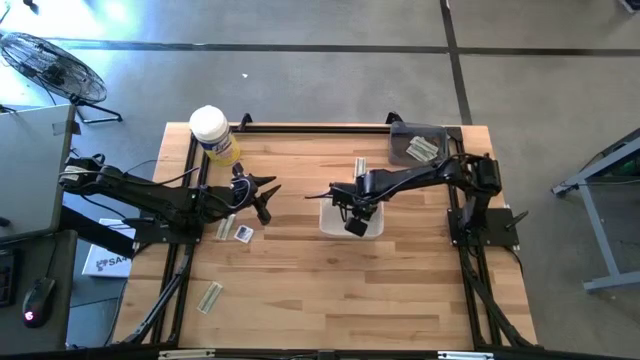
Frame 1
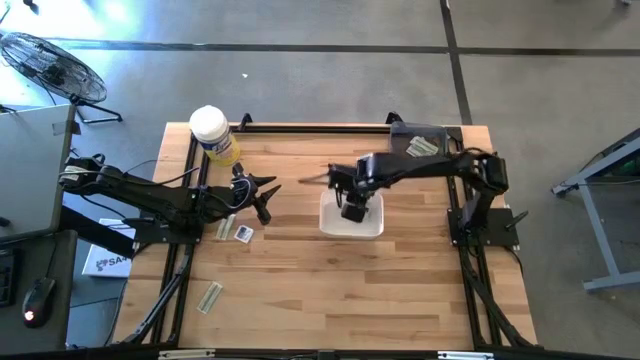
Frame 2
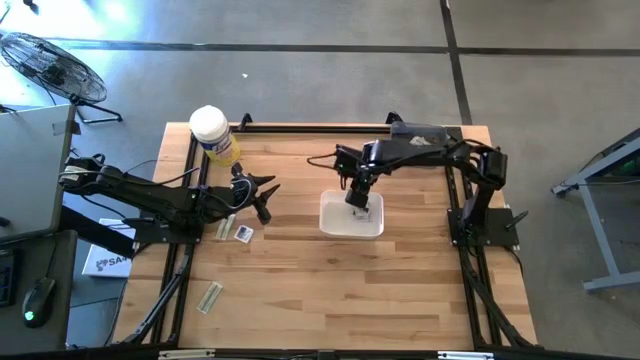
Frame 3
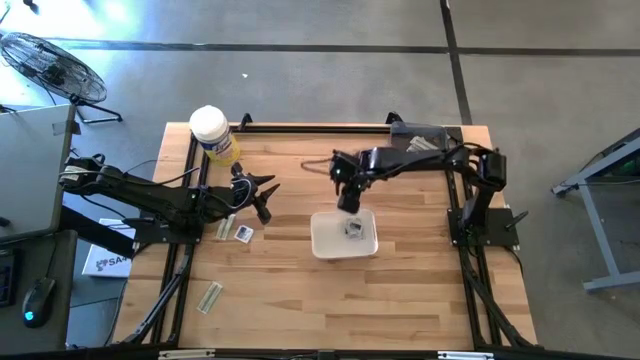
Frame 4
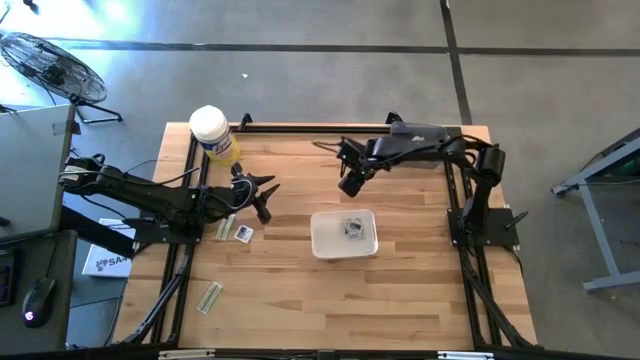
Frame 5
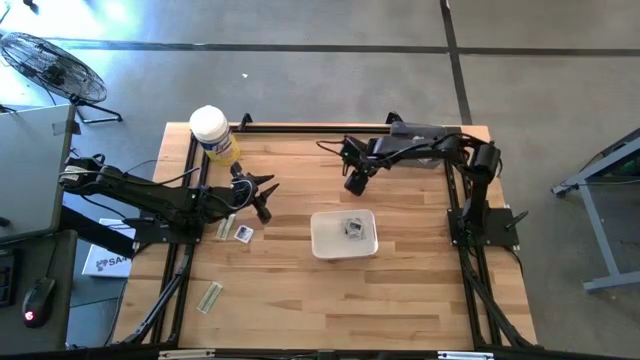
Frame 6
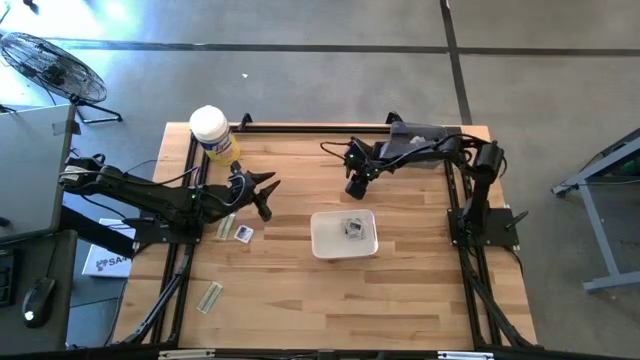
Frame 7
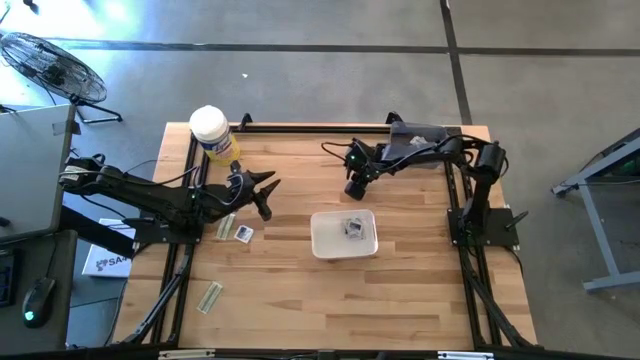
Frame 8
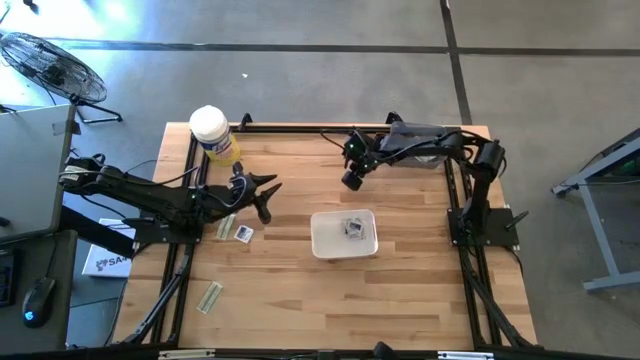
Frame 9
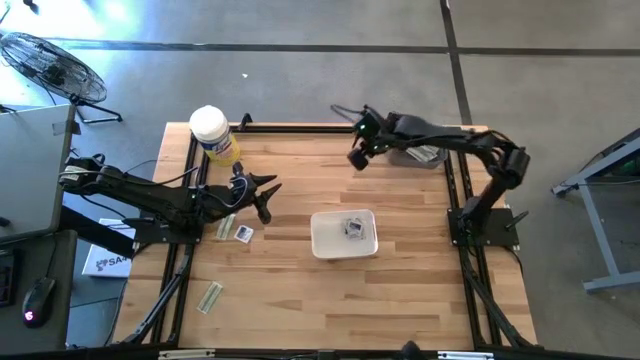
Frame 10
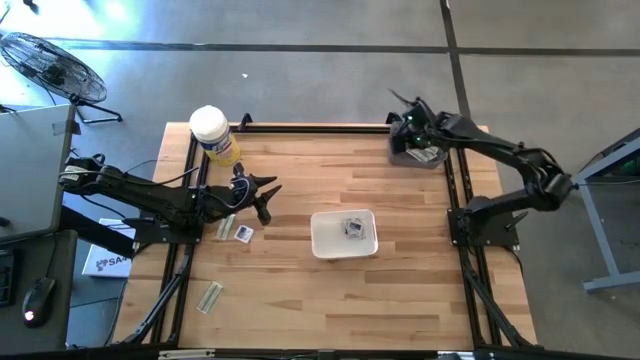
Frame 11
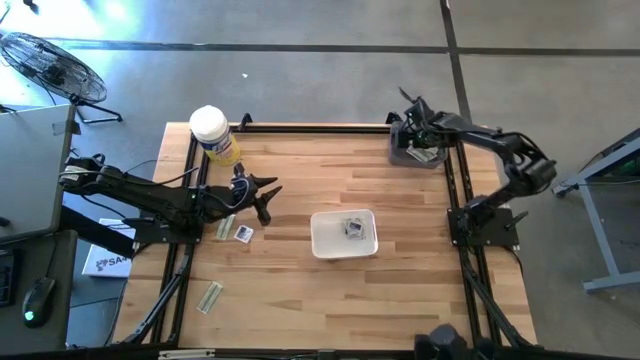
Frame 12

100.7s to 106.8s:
Task: Pick & Place First Aid Supplies
Put the green bandage into the black bin

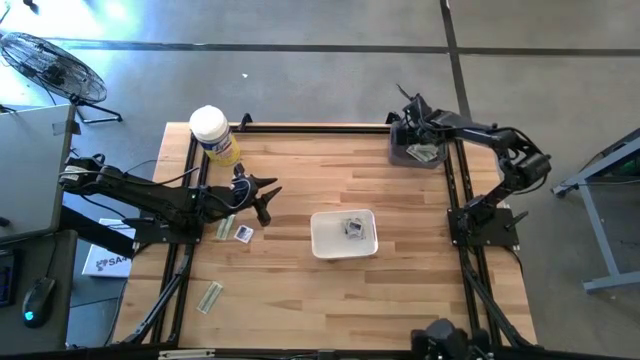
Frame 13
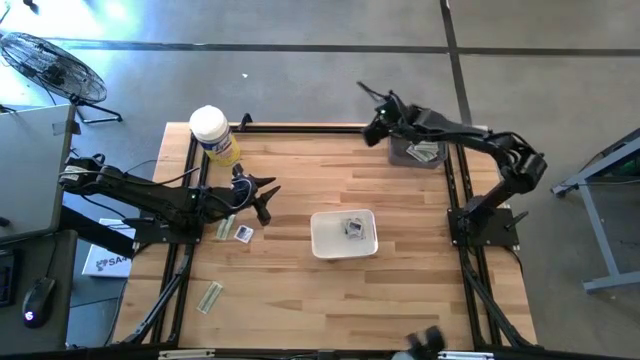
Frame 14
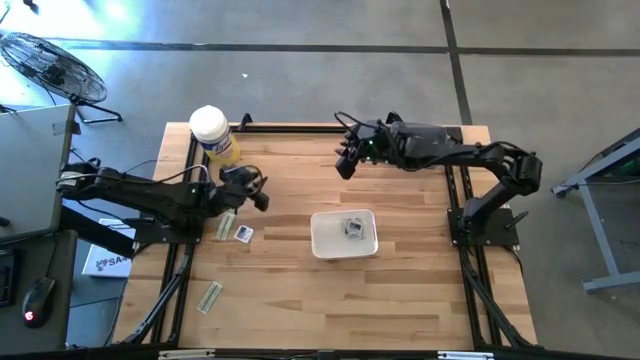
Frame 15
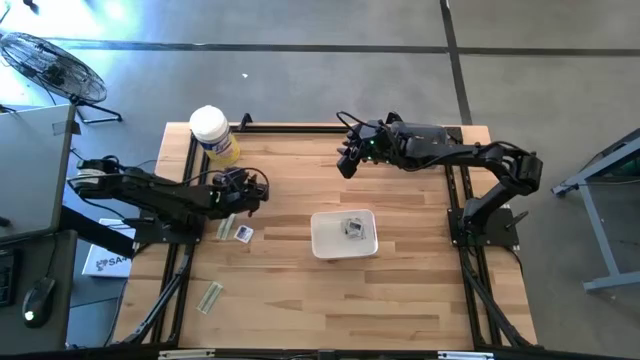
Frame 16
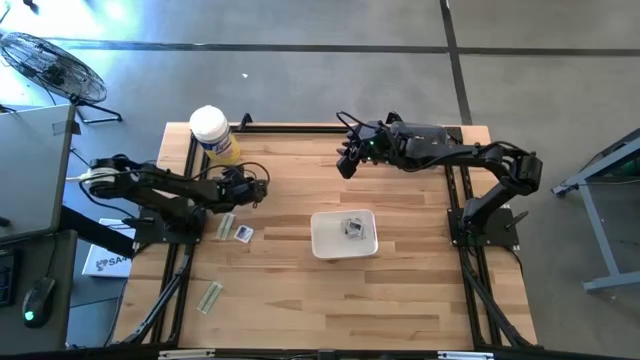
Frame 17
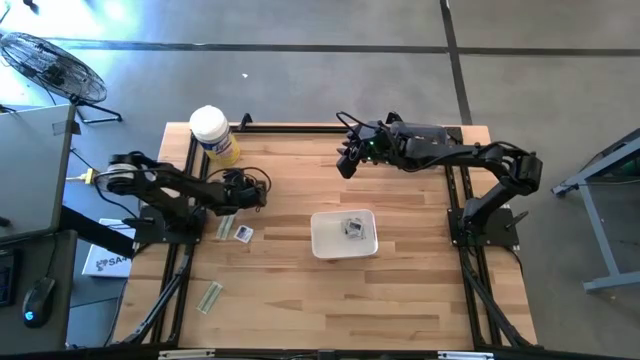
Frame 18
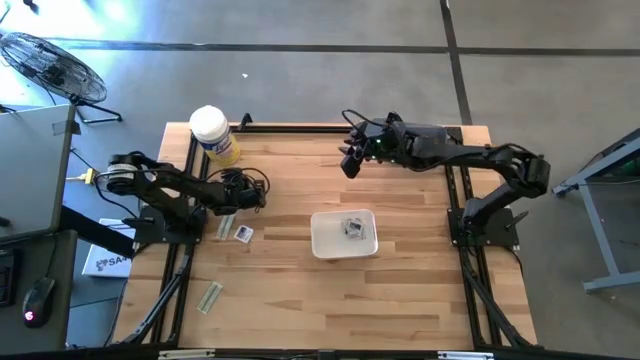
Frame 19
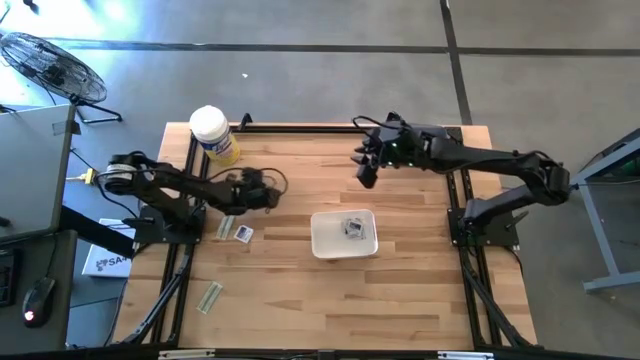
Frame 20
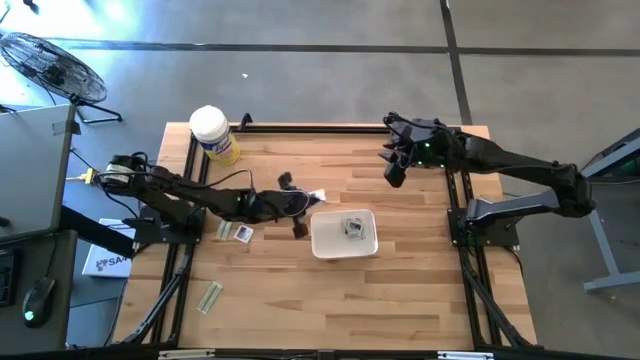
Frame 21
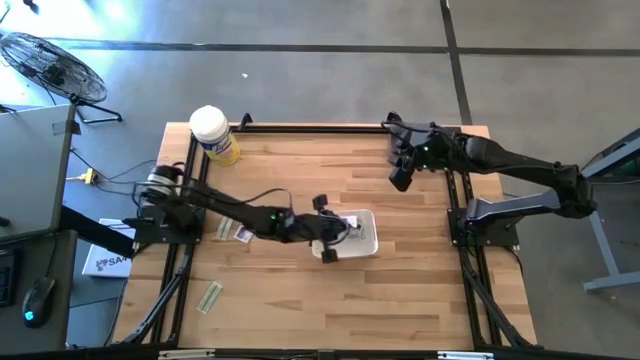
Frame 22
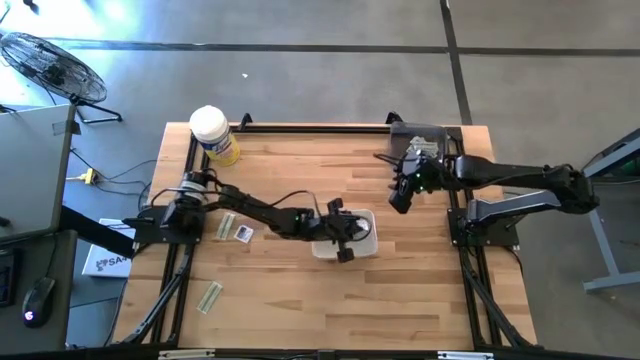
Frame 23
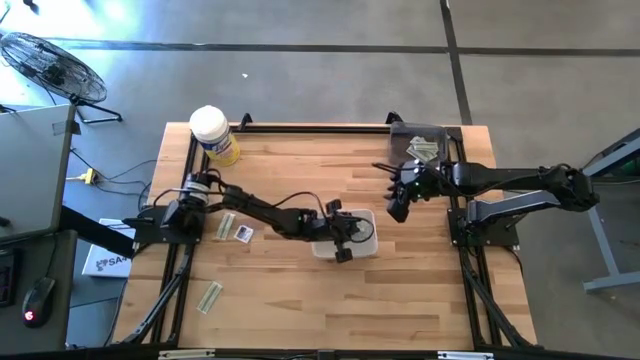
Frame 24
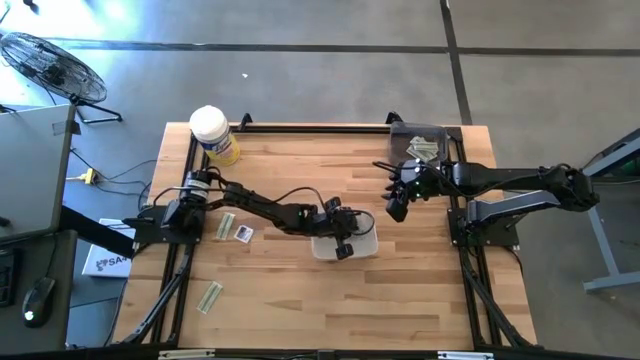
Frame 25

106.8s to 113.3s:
Put the blue alcohol pad into the white bin

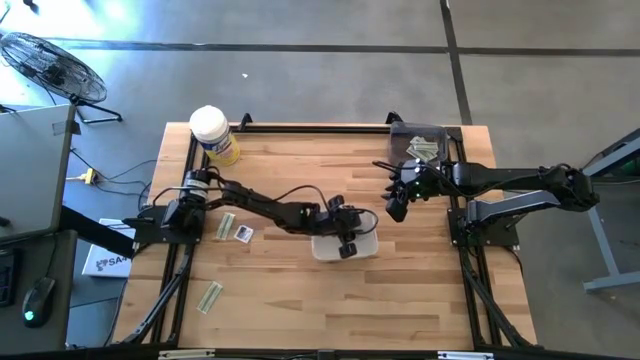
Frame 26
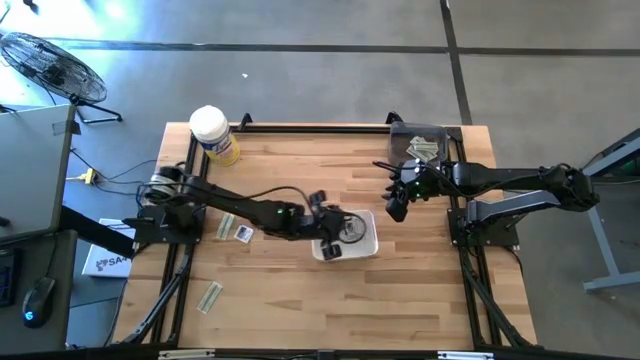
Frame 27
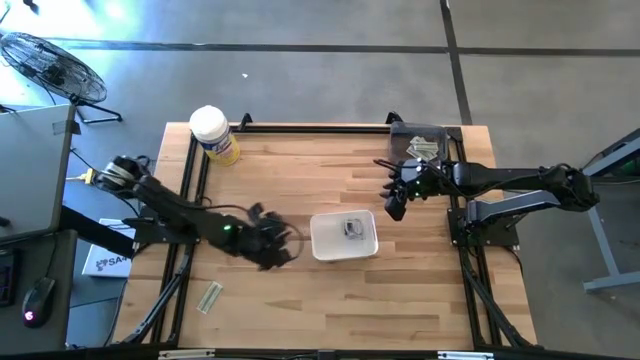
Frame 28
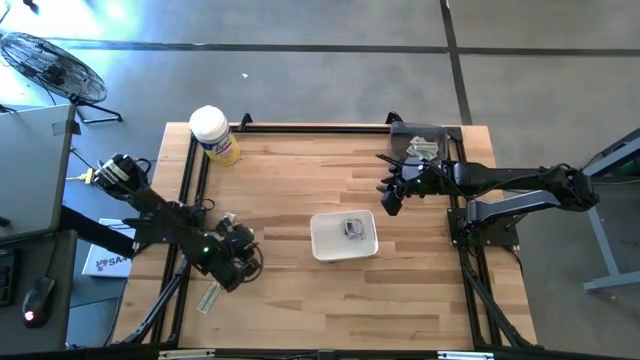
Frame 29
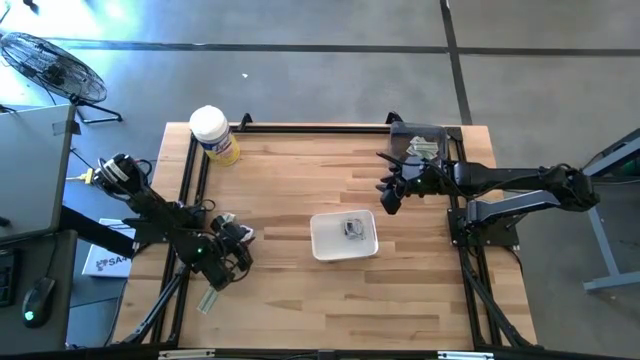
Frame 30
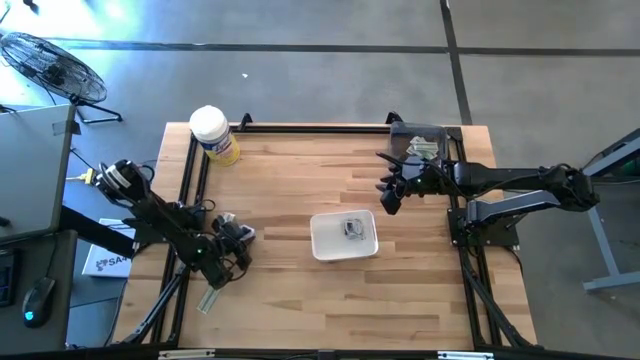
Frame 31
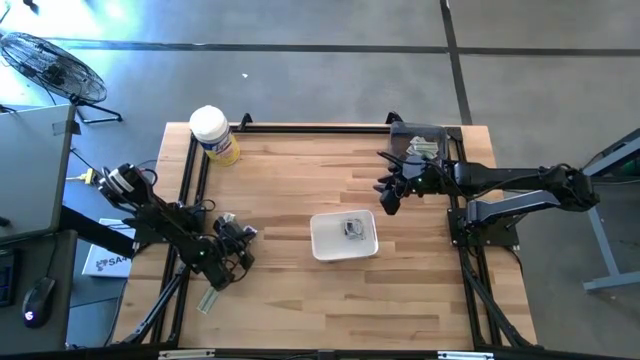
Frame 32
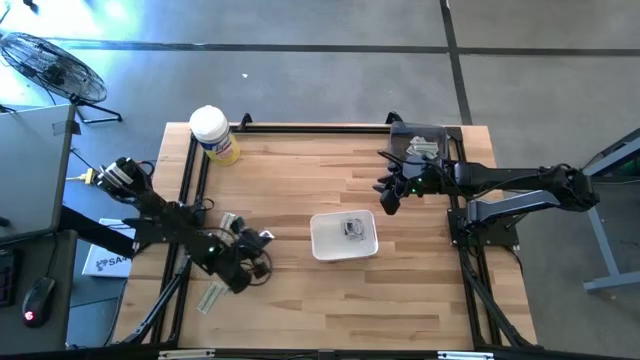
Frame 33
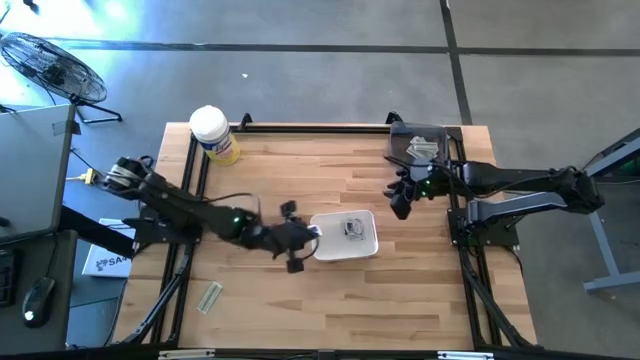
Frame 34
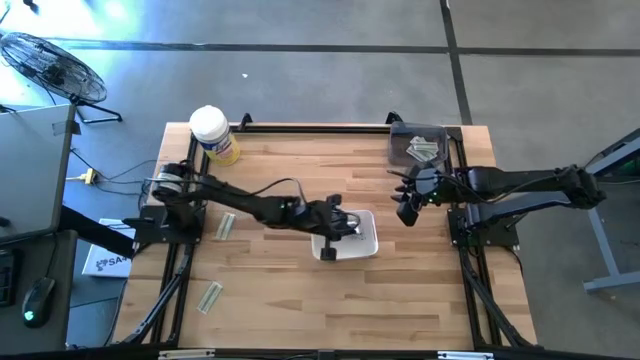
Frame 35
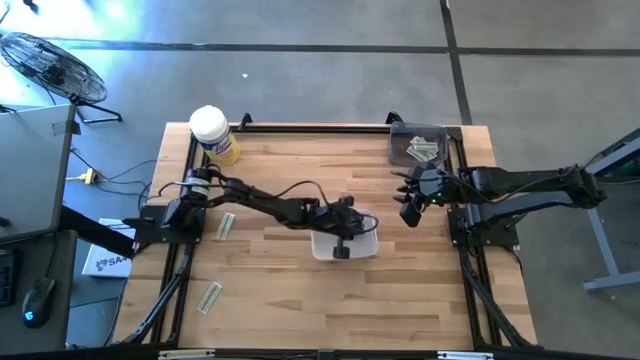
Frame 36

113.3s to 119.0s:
Put the blue alcohol pad into the white bin

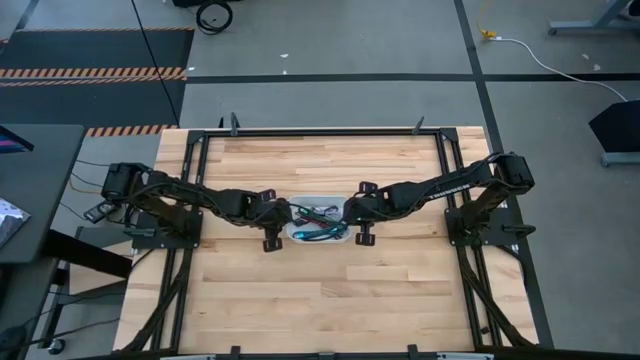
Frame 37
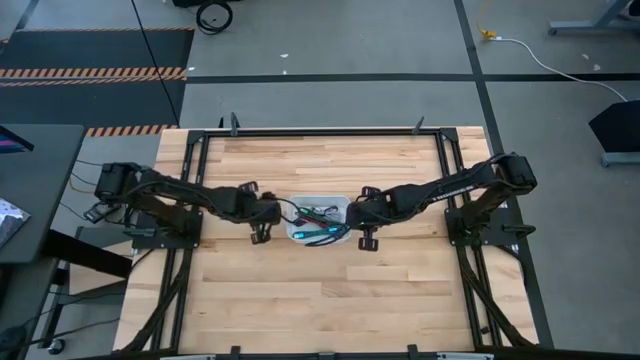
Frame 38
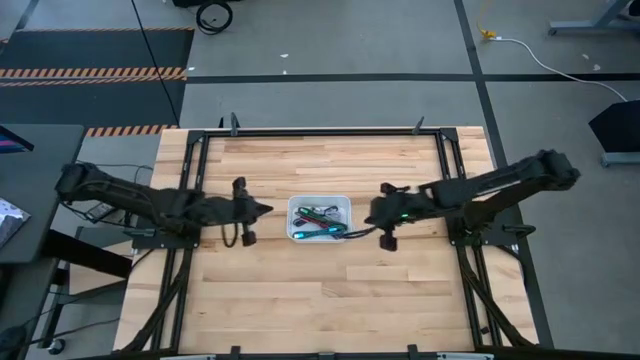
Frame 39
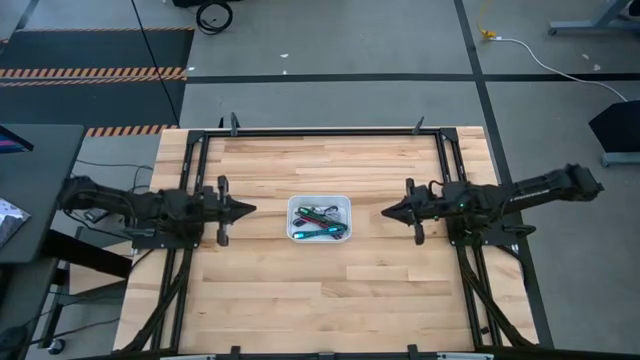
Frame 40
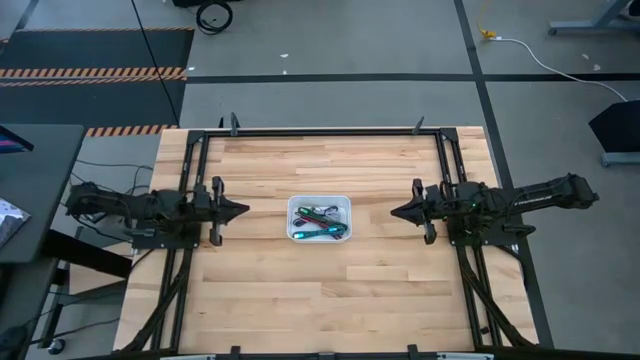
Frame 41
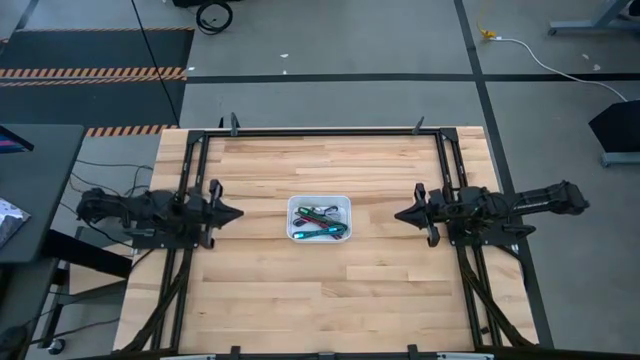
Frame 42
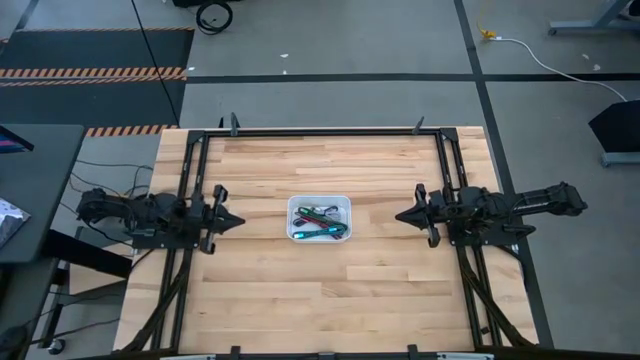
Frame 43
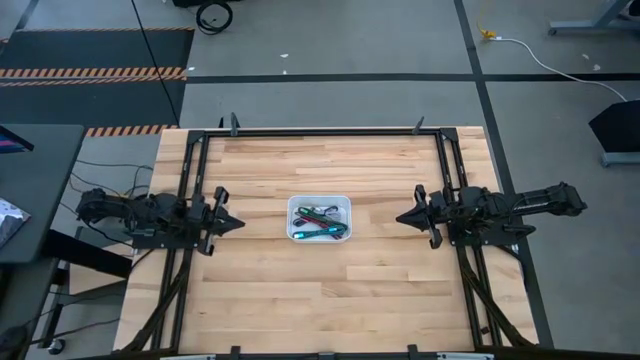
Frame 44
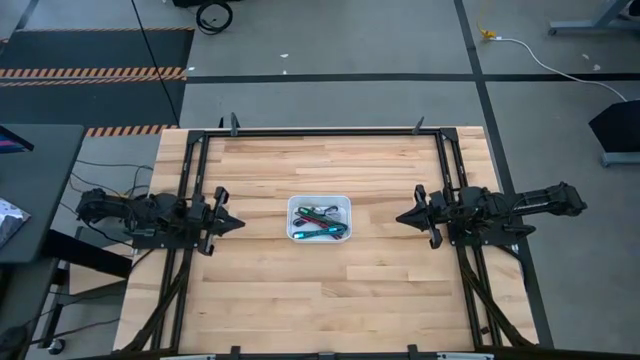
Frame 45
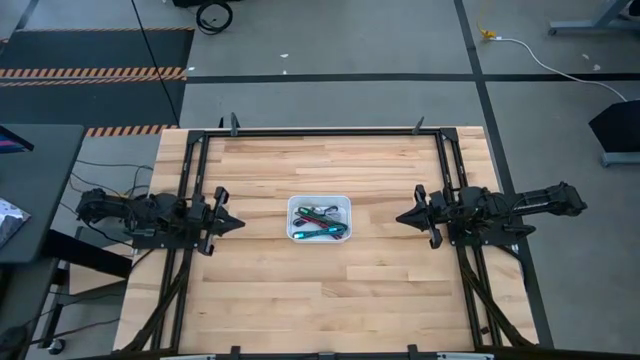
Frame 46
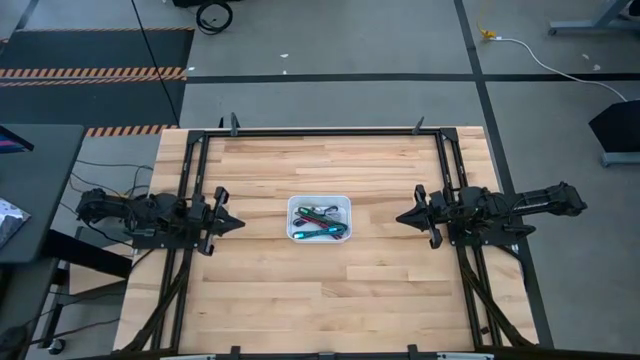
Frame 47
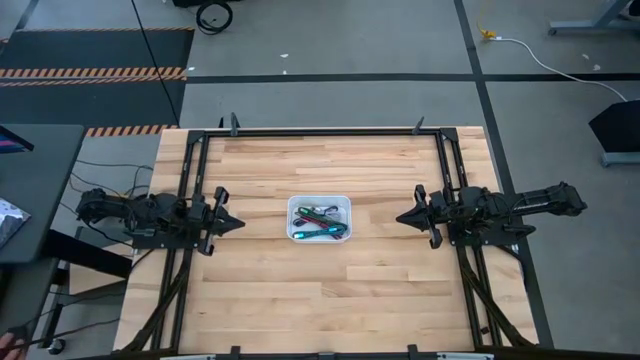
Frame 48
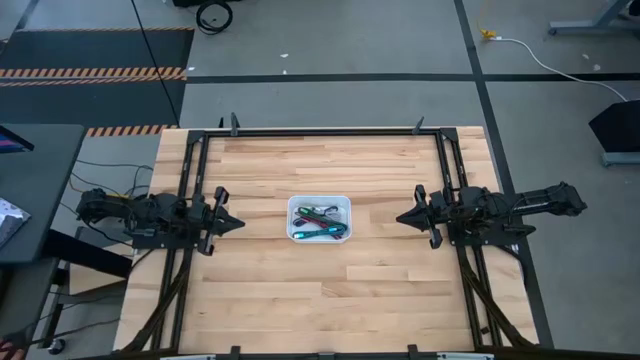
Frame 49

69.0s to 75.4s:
Task: Pick and place USB-C Cables
Return to Home Position
